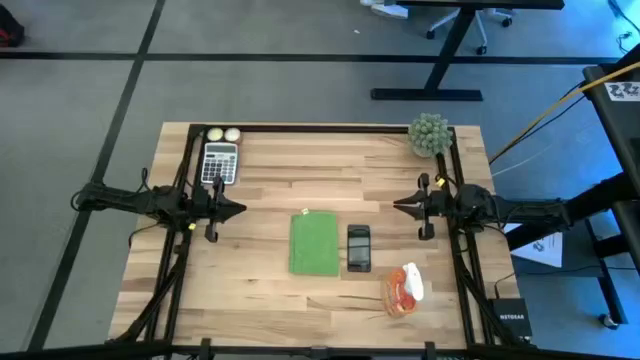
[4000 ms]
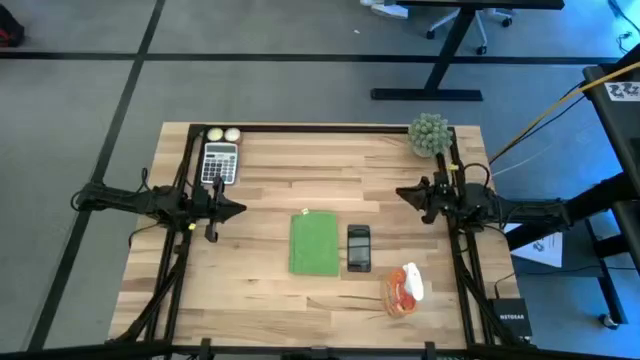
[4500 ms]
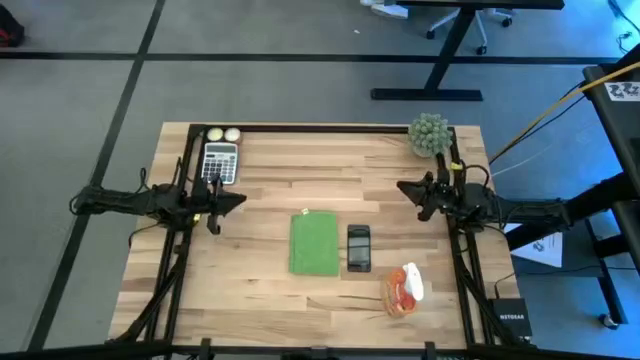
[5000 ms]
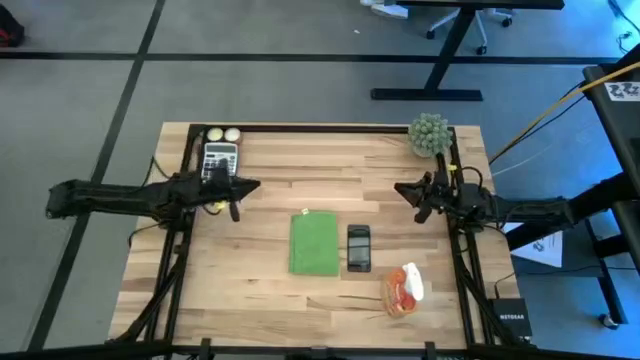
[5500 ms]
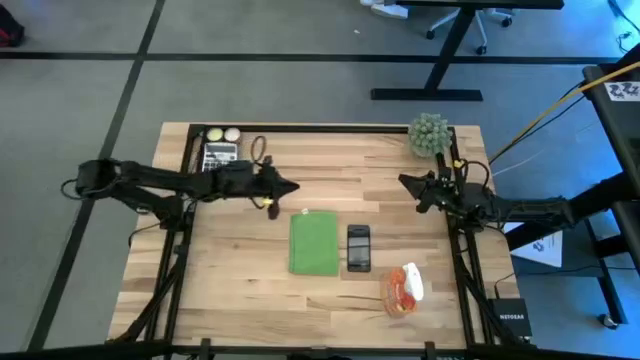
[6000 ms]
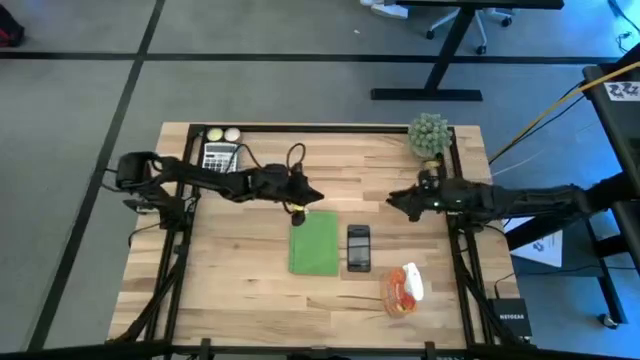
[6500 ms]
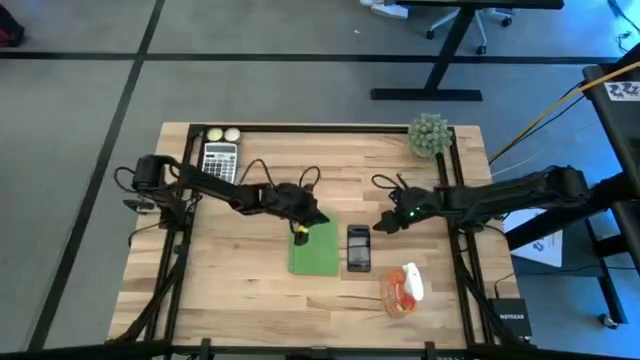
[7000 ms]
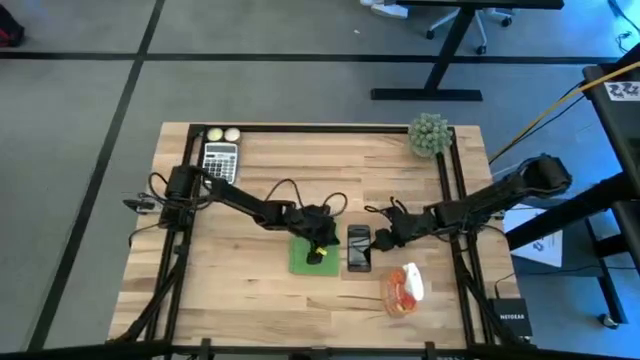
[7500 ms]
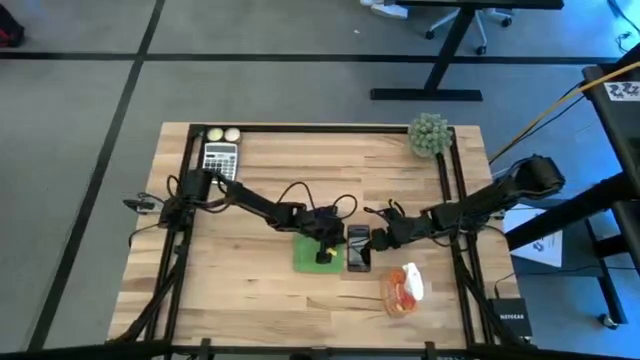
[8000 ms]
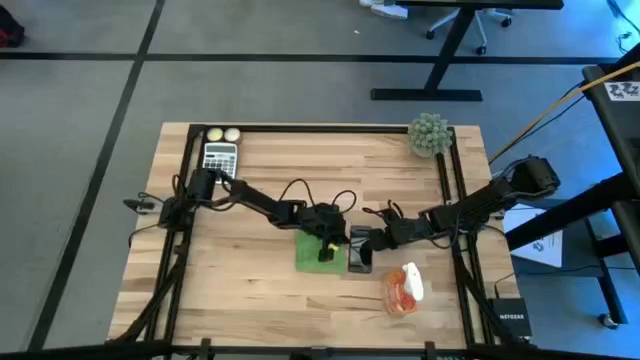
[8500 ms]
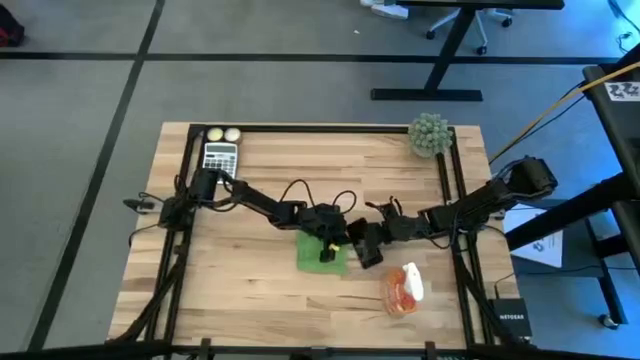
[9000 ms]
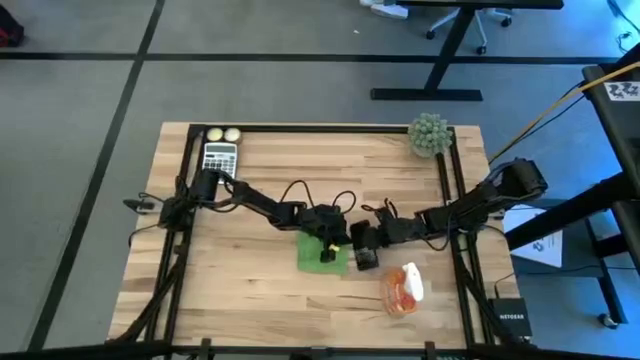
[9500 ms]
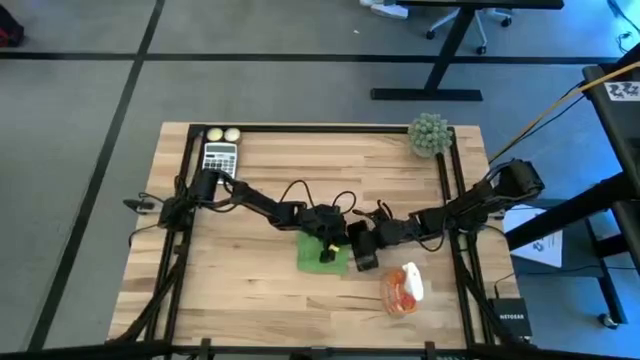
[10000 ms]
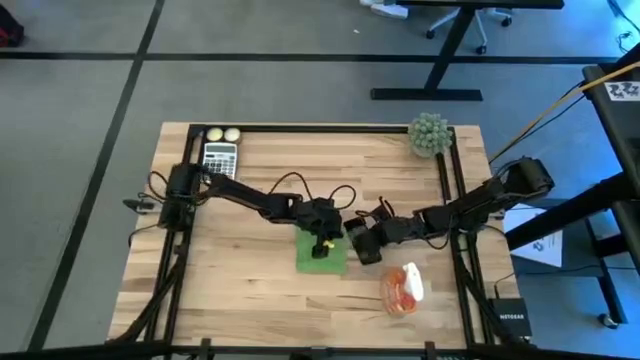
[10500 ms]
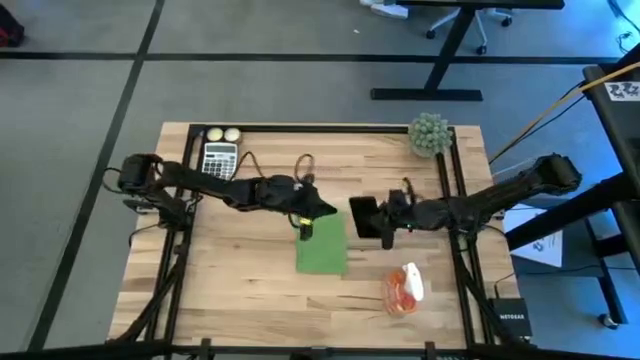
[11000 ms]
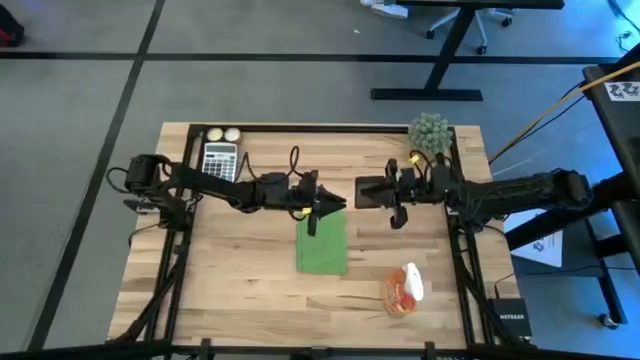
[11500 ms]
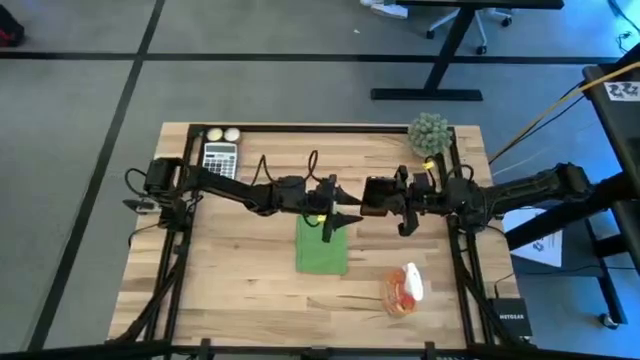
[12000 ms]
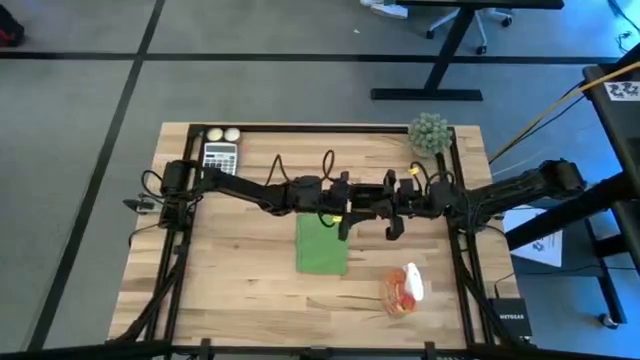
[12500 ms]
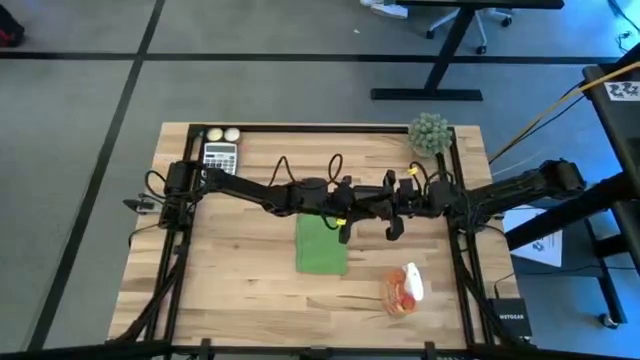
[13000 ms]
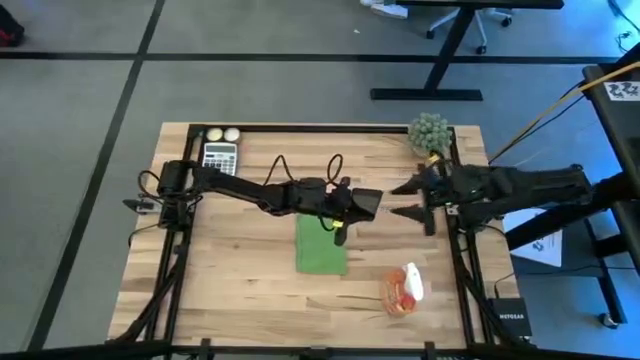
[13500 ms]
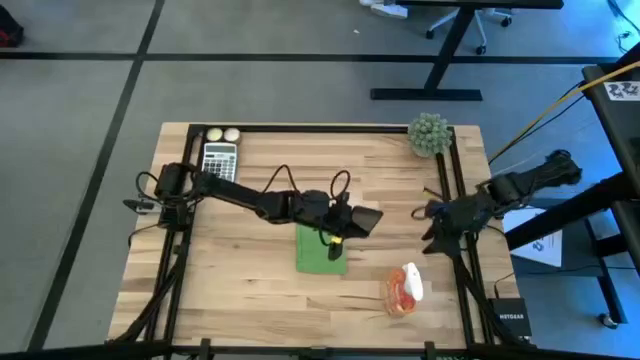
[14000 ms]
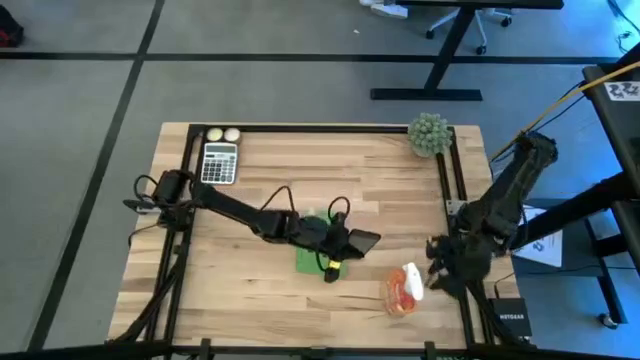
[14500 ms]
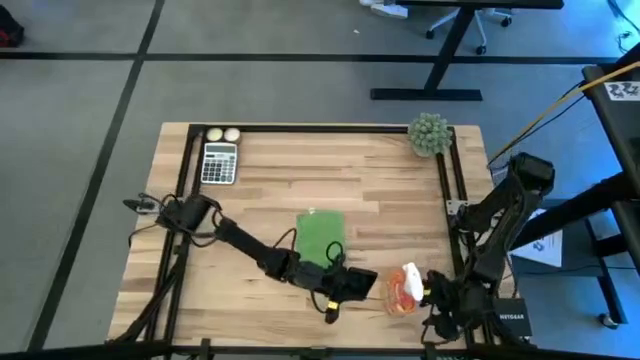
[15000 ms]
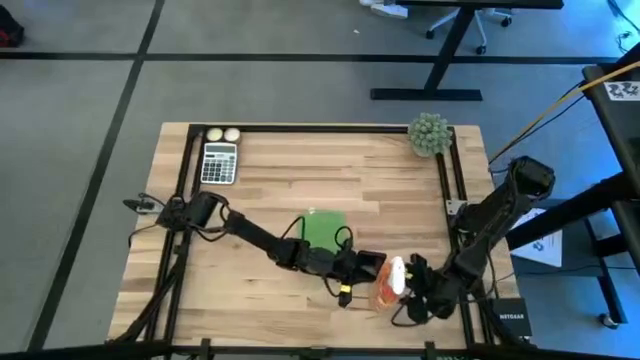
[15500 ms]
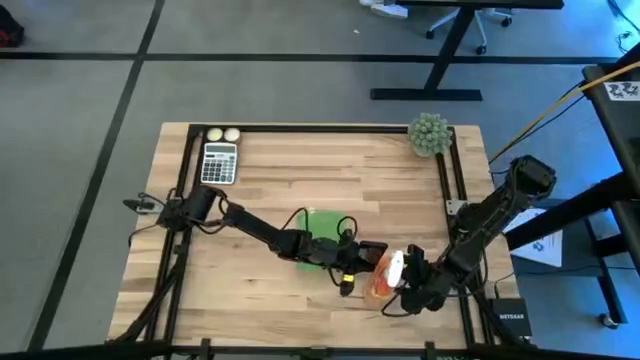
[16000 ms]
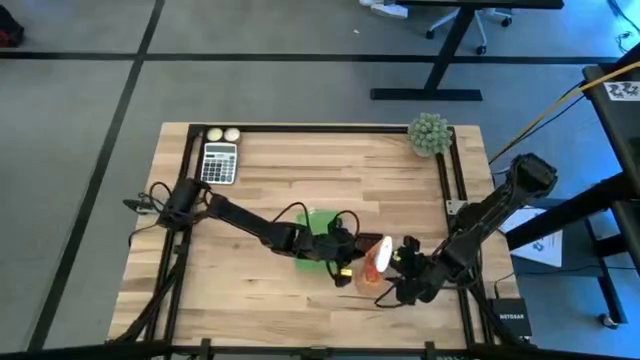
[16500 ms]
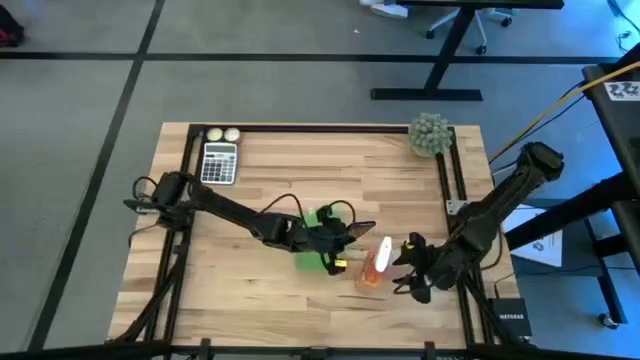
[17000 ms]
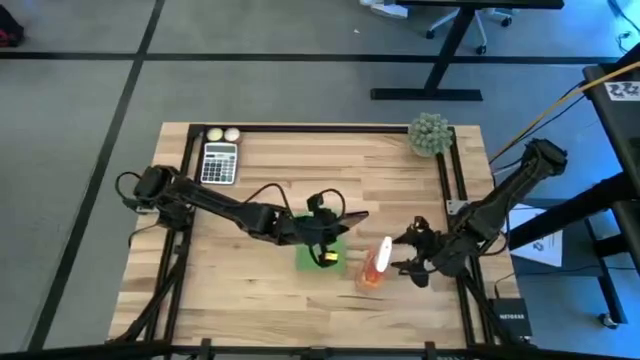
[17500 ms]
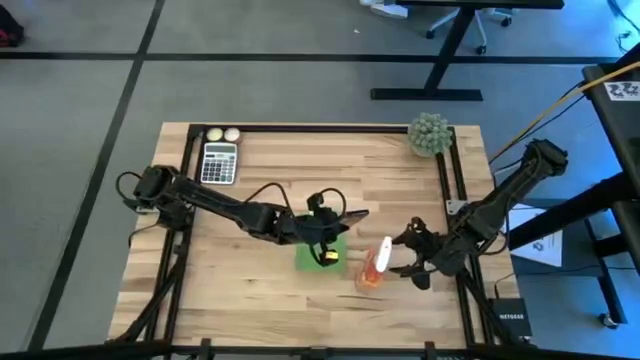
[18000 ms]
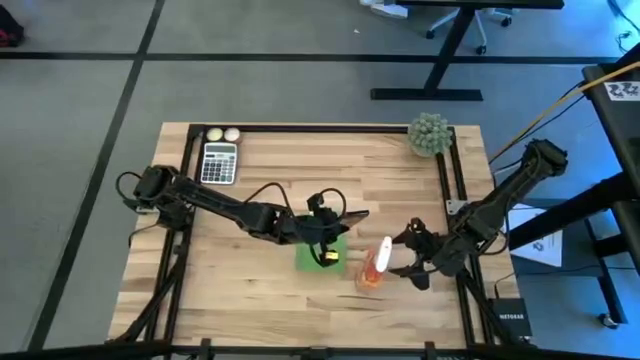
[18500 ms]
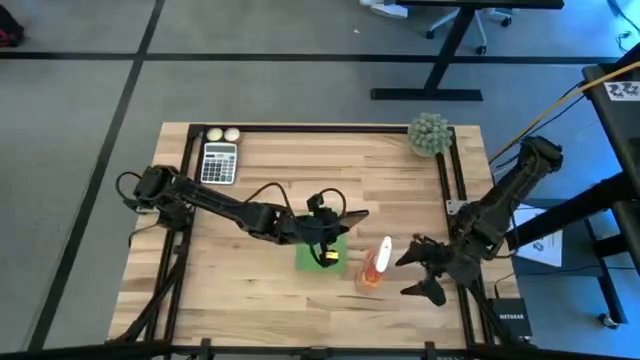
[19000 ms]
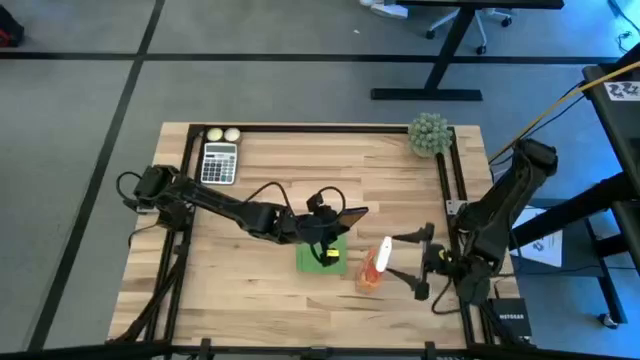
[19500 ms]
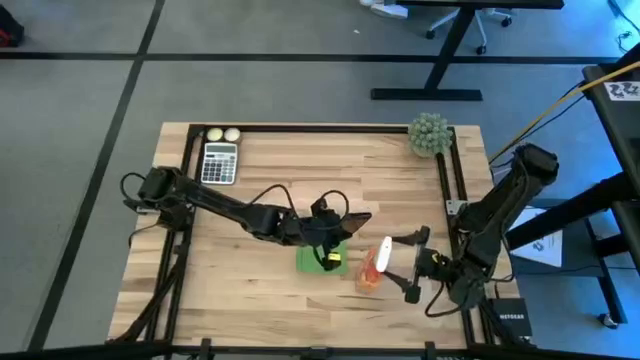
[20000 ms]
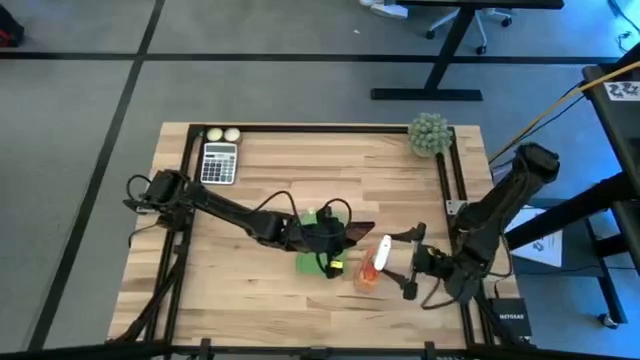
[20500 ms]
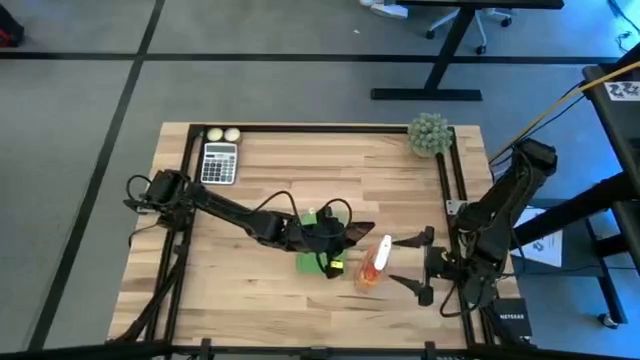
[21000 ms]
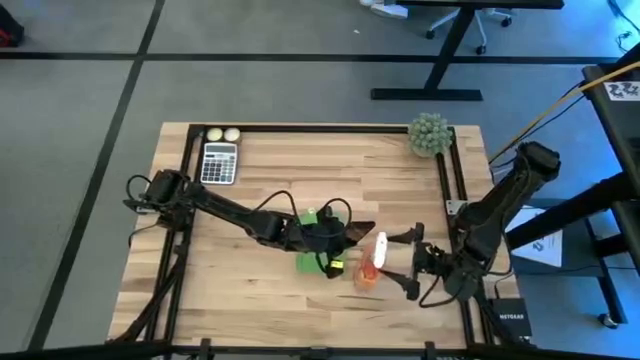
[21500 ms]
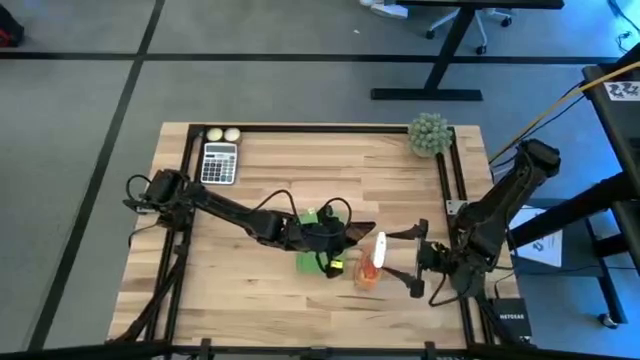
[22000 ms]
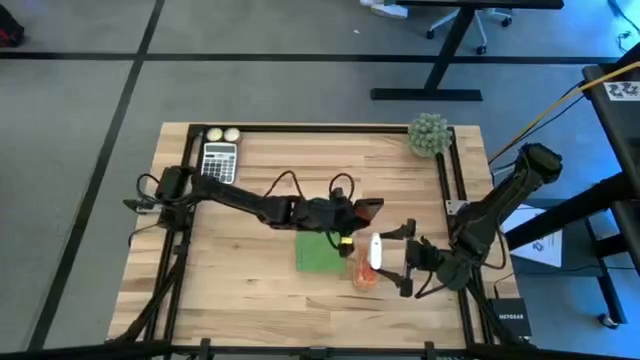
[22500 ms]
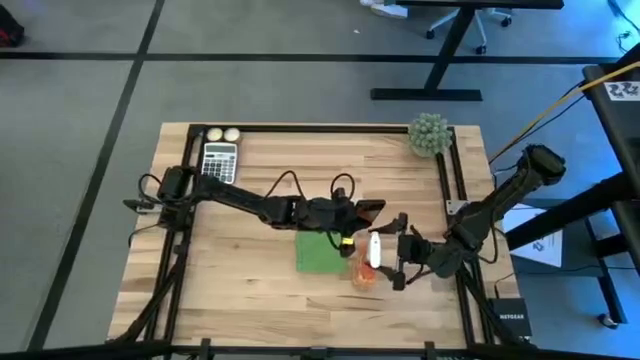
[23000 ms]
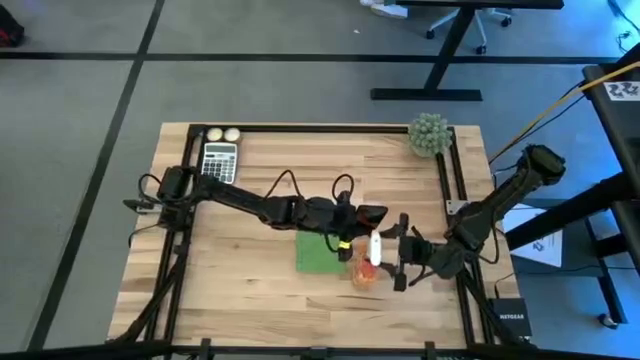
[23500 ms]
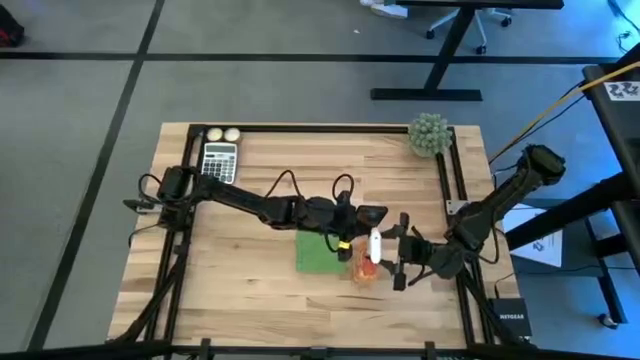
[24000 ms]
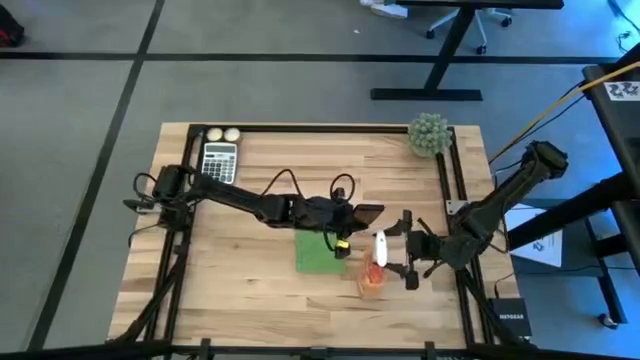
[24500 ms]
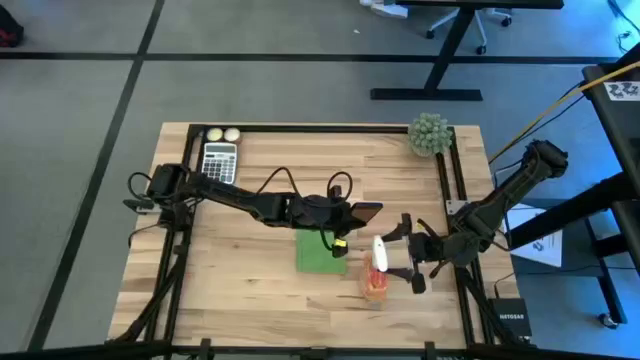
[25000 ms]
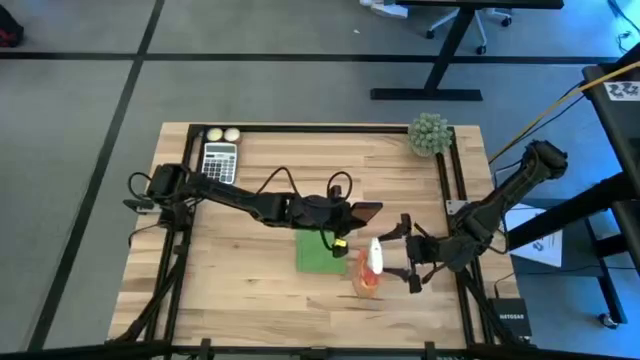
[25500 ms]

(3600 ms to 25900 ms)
Task: Apply microfiber cloth
Spray the black cellphone using the spray bottle
